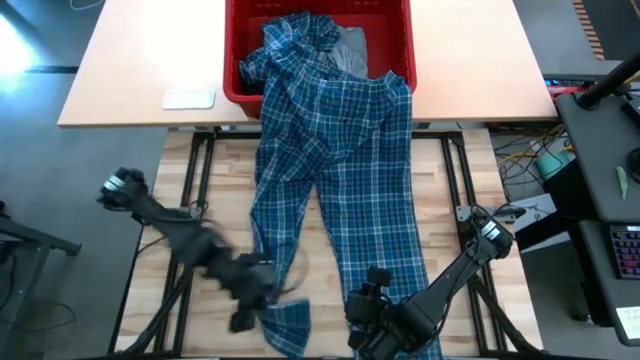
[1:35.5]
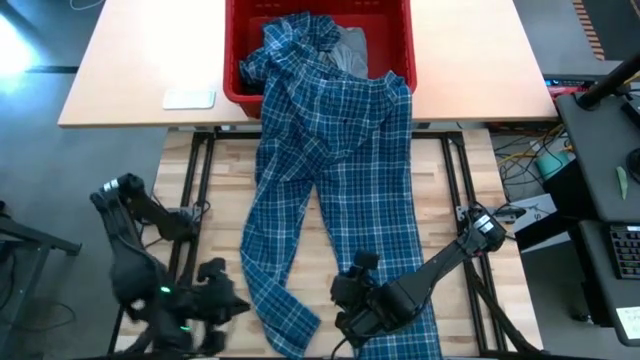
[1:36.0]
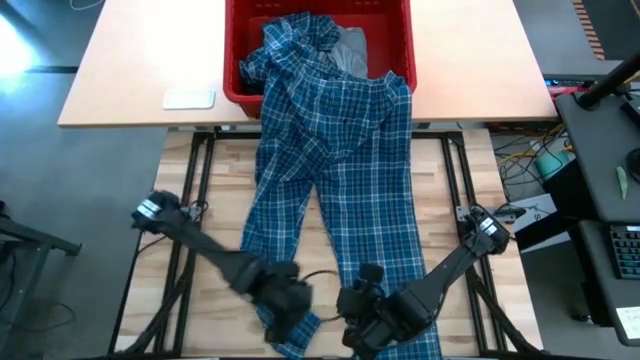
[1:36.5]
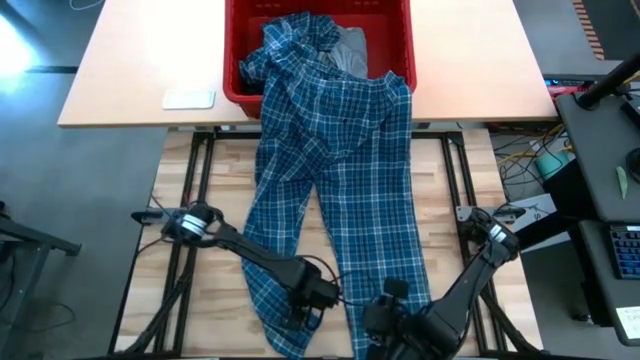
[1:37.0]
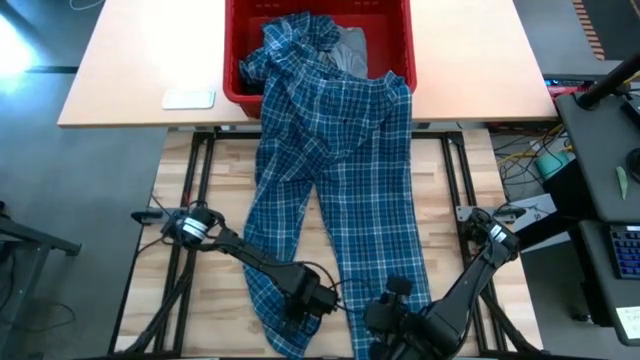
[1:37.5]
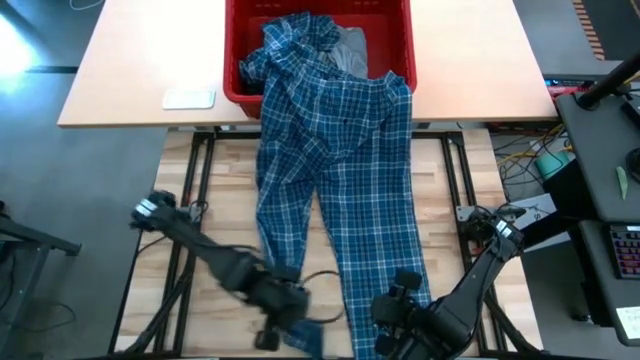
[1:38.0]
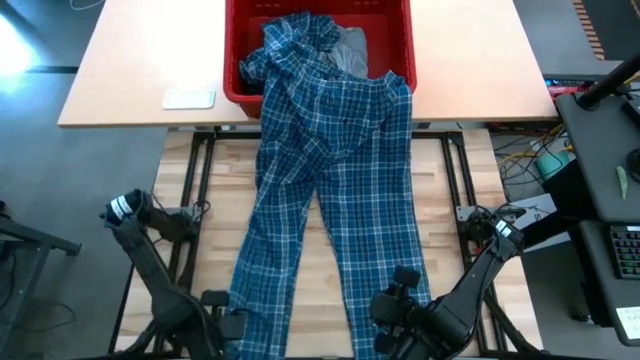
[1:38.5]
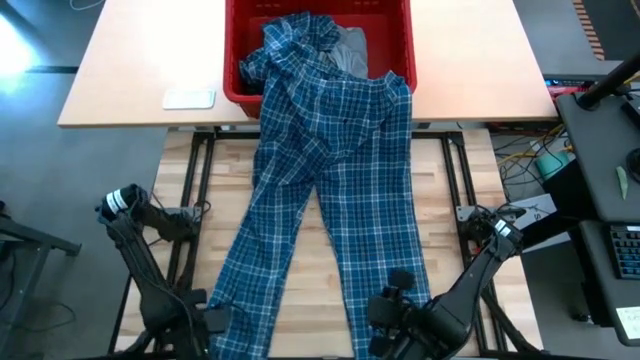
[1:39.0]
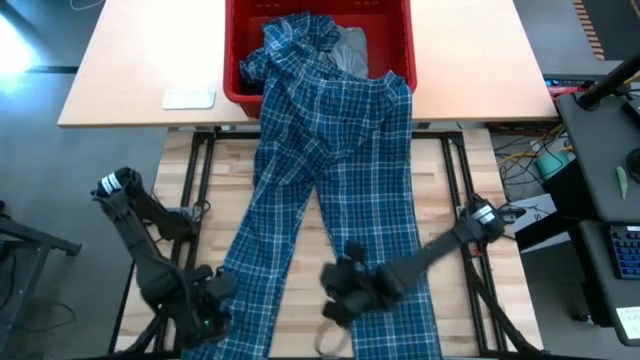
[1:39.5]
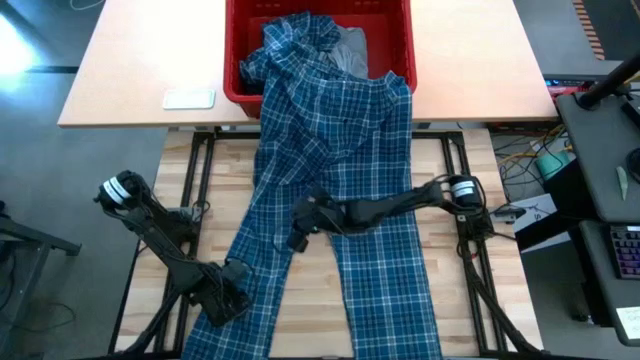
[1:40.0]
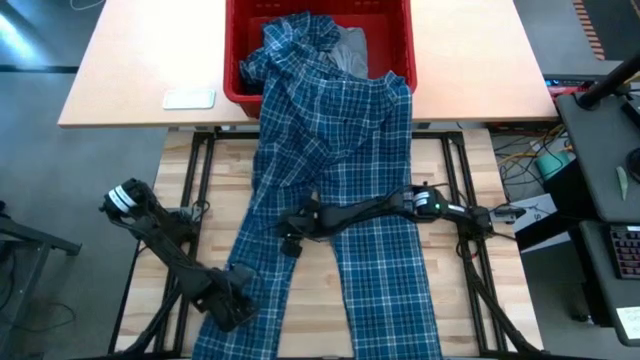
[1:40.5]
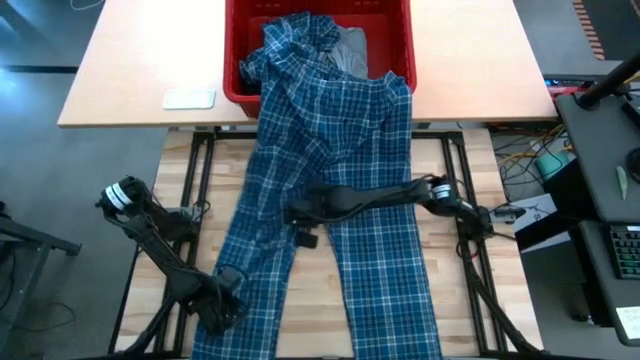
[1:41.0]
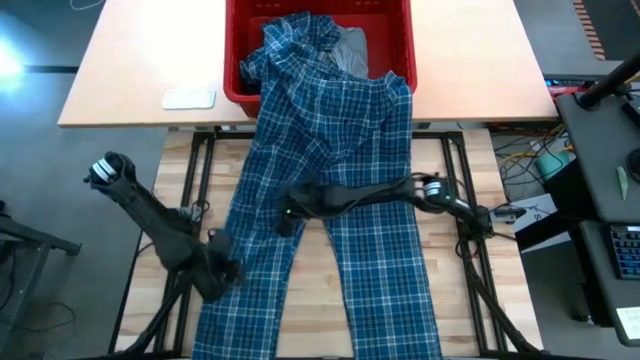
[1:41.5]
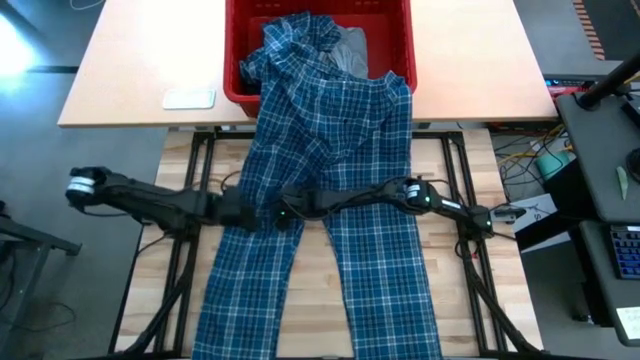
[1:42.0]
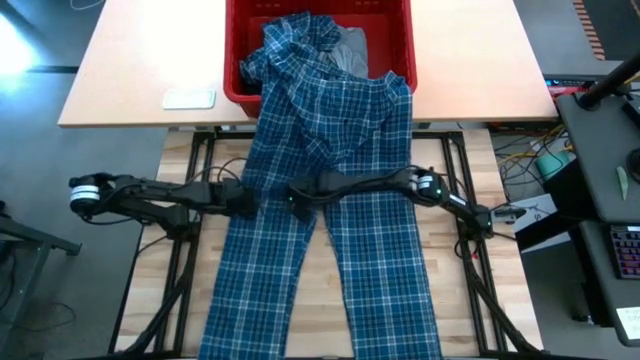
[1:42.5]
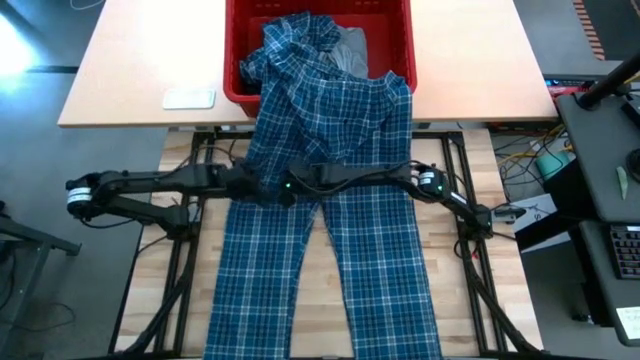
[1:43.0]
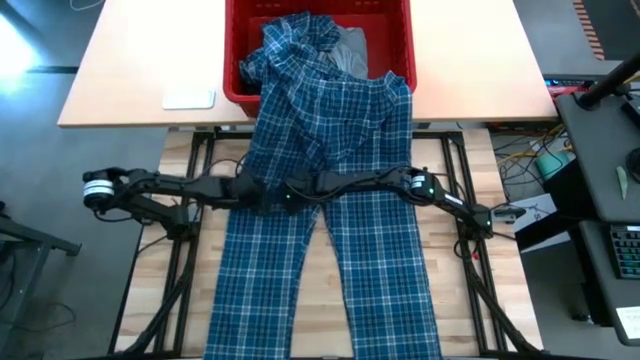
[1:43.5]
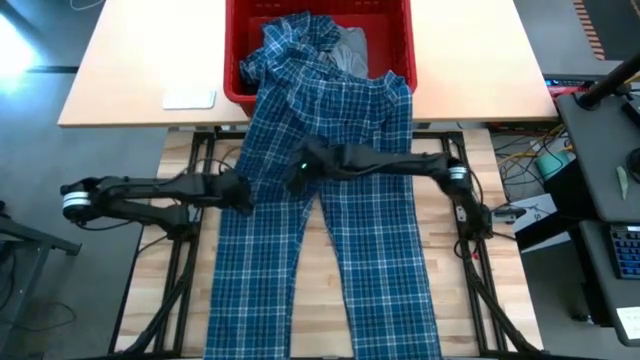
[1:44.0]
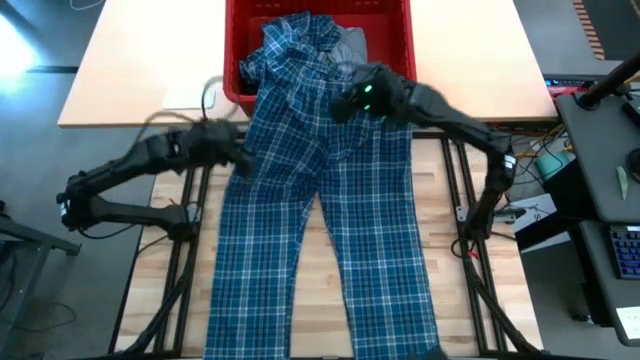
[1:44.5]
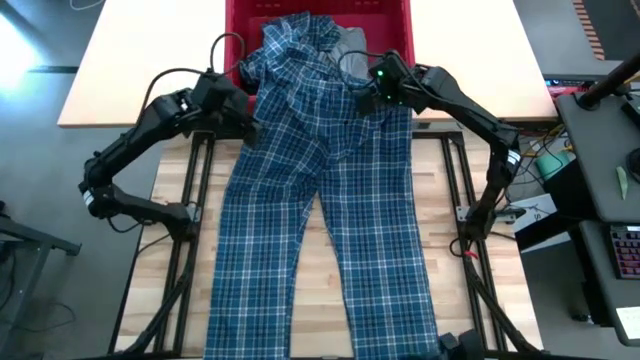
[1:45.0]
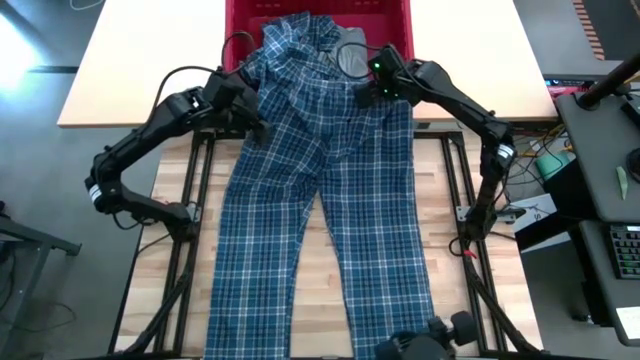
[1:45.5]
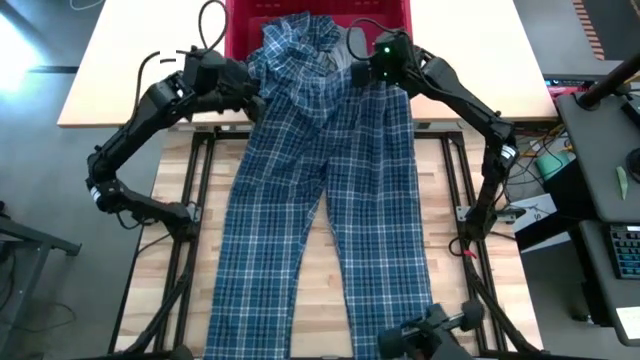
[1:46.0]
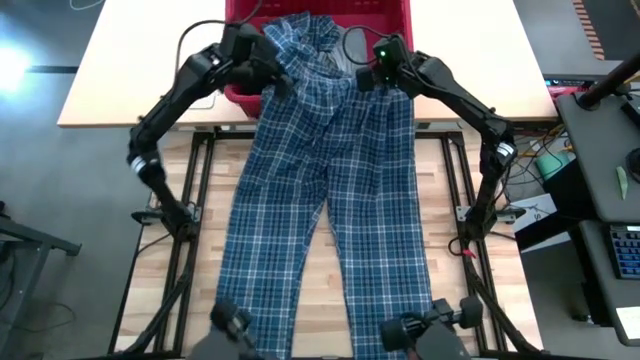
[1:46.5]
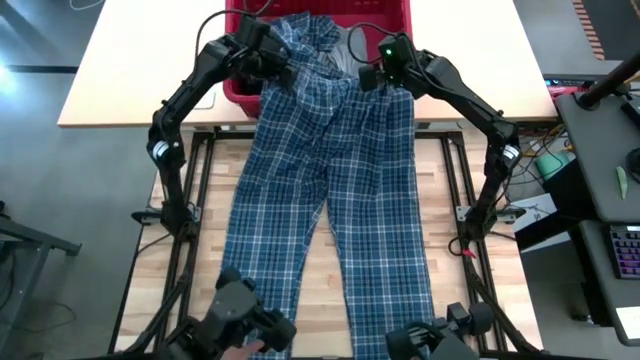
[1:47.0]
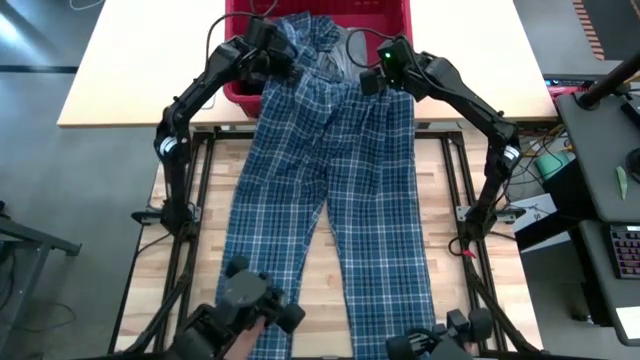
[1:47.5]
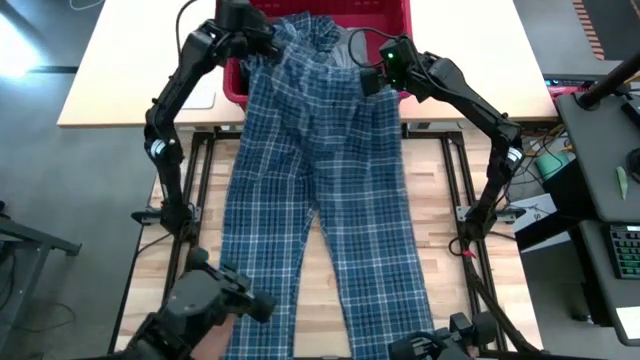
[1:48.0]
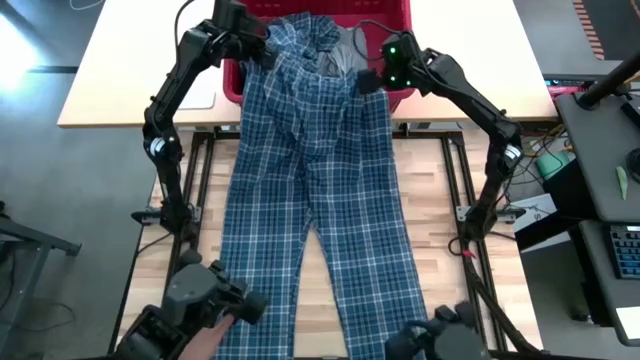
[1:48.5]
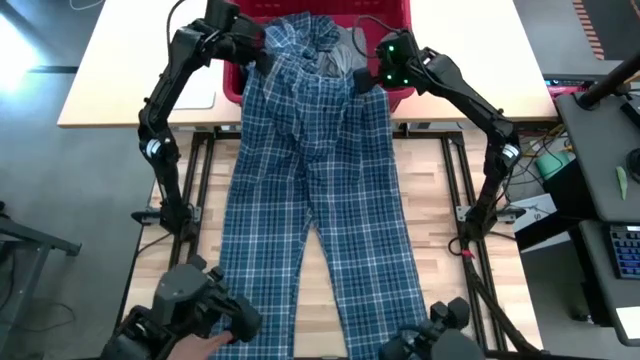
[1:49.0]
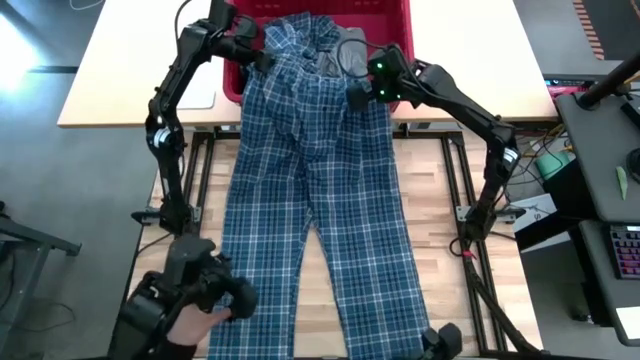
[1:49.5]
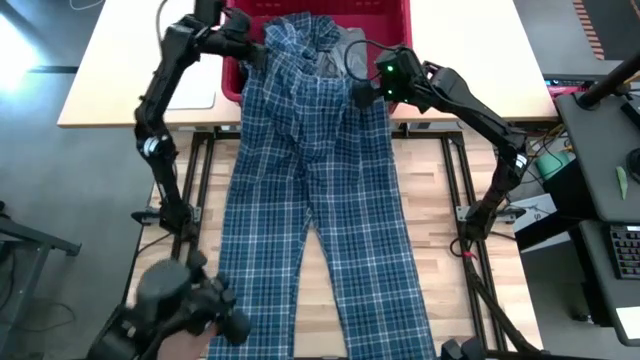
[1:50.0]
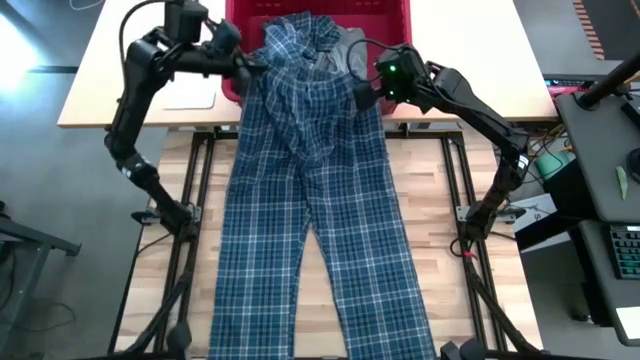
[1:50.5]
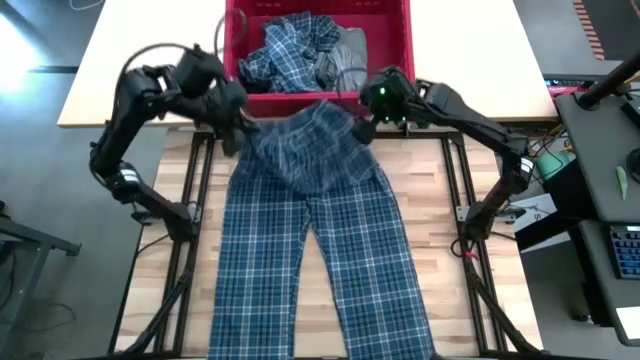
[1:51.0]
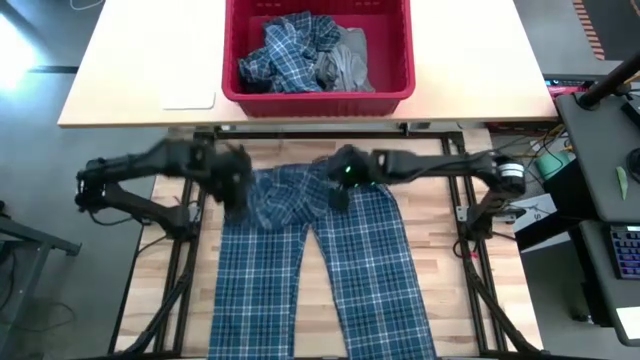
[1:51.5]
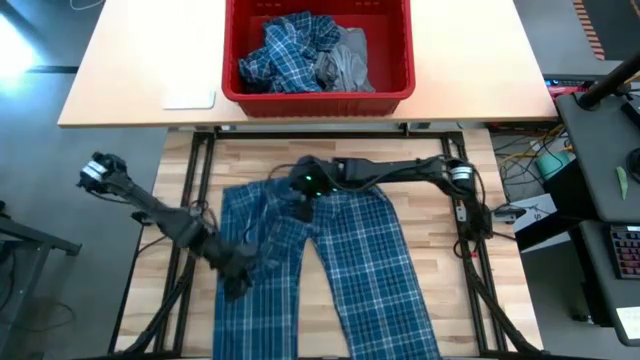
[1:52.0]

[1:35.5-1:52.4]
Task: Fold Laundry from Bin
Fold the blue patterned pants

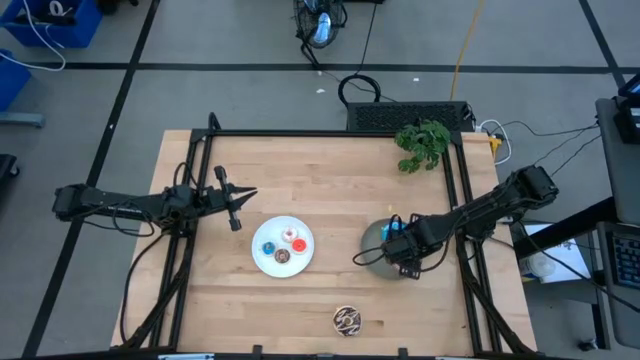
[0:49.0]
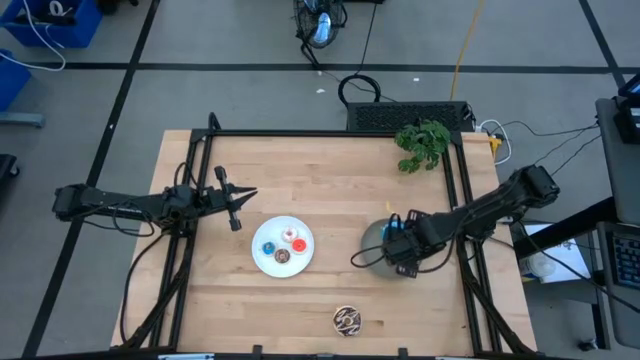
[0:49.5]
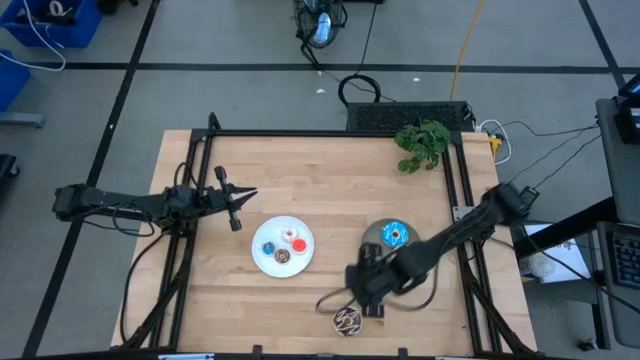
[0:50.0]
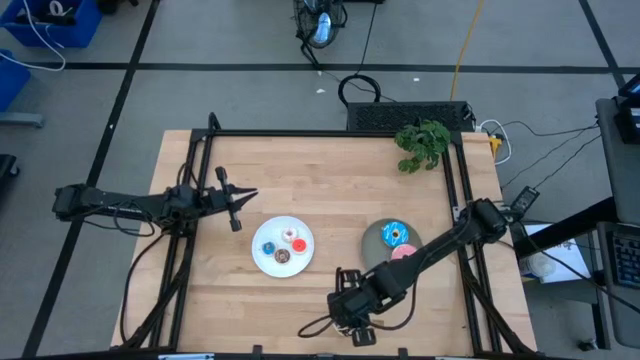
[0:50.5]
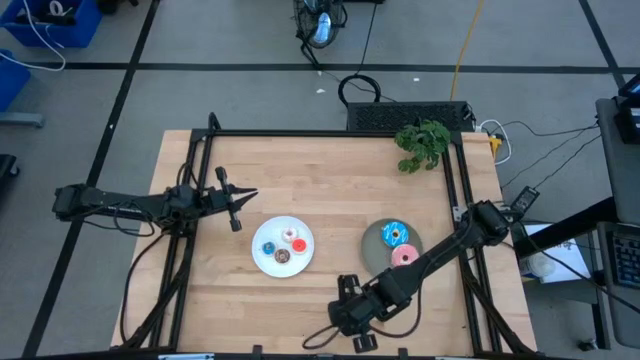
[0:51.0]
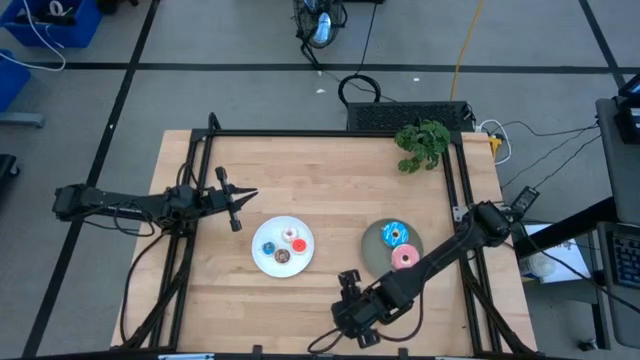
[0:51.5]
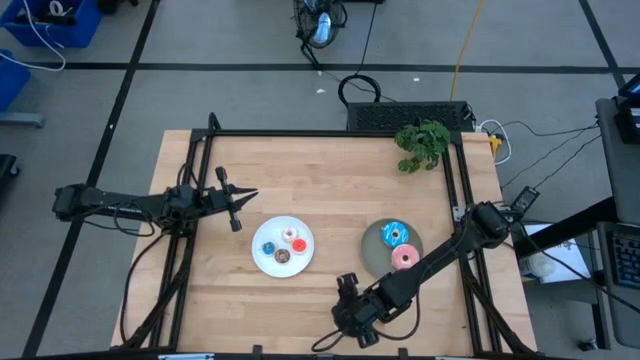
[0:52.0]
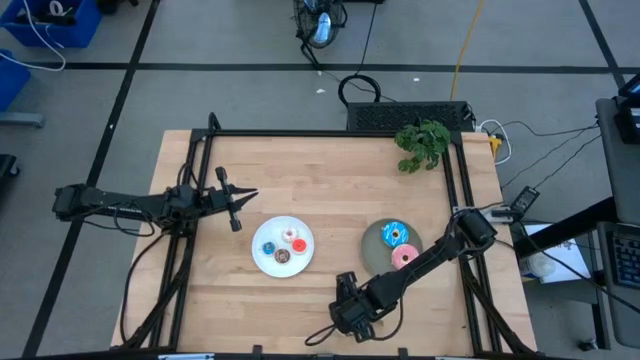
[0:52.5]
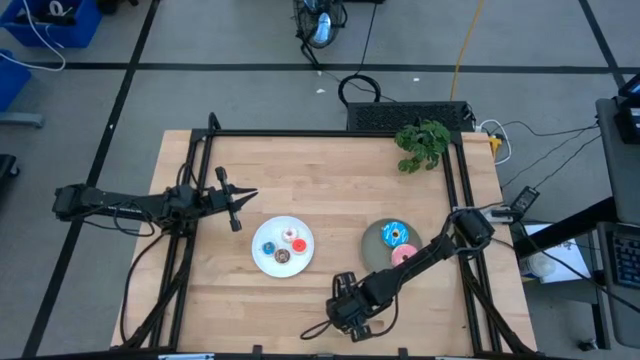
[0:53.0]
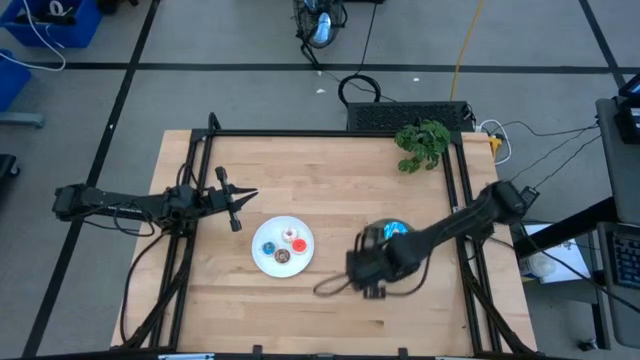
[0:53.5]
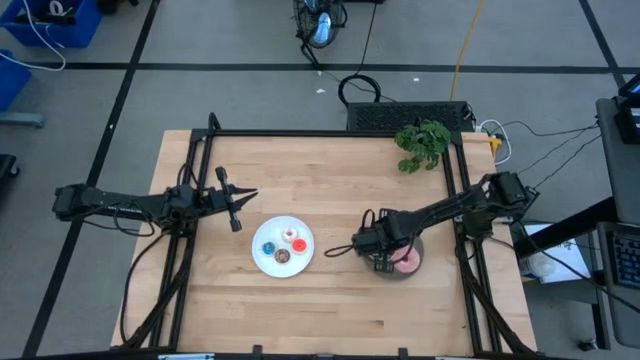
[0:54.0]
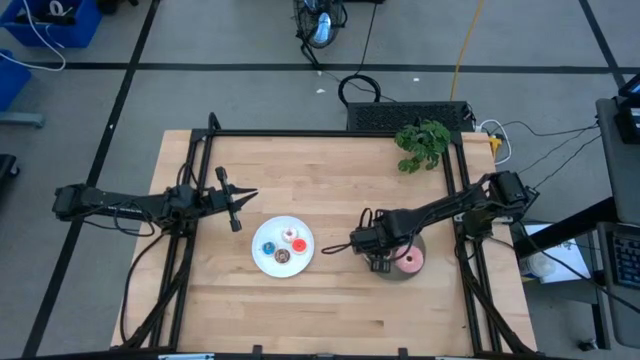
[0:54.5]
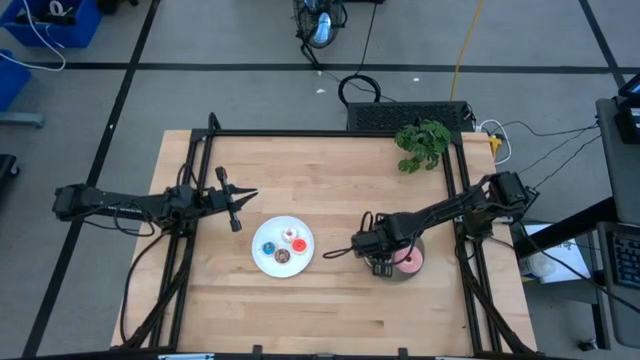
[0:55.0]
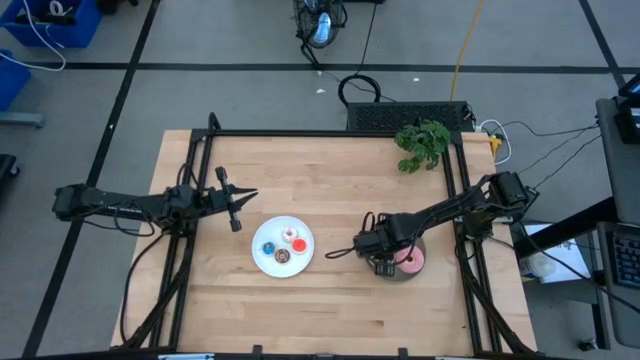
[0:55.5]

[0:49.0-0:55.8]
Task: Pick & Place donuts
Put the large black donut on the gray plate
